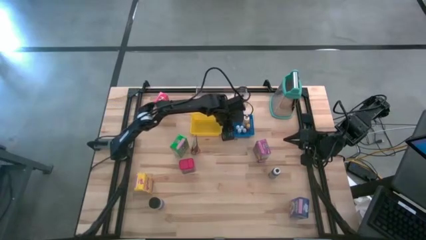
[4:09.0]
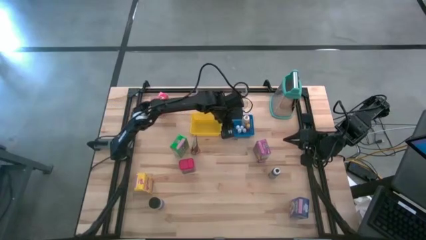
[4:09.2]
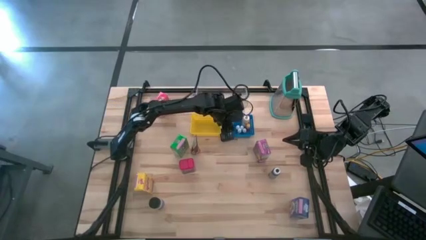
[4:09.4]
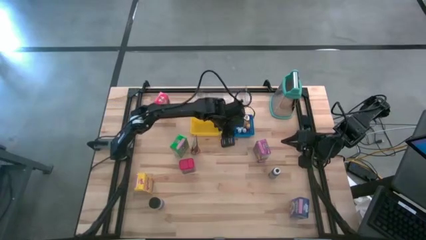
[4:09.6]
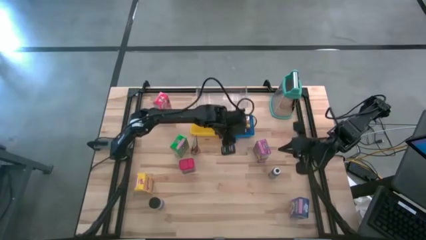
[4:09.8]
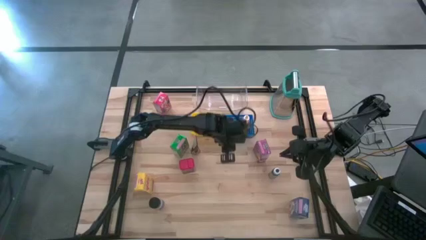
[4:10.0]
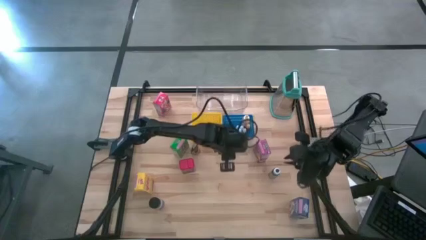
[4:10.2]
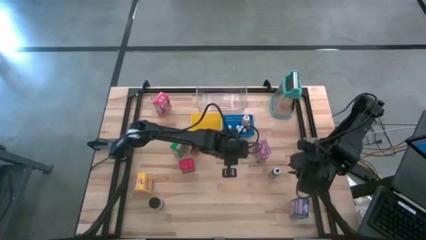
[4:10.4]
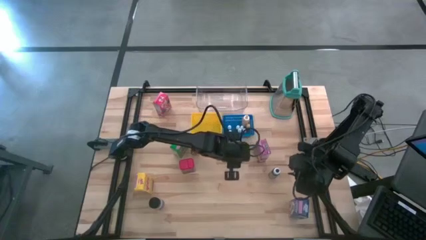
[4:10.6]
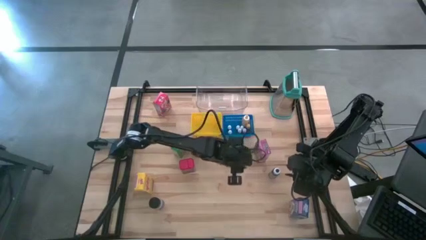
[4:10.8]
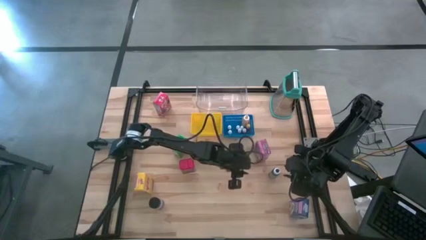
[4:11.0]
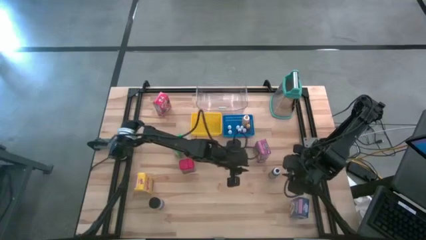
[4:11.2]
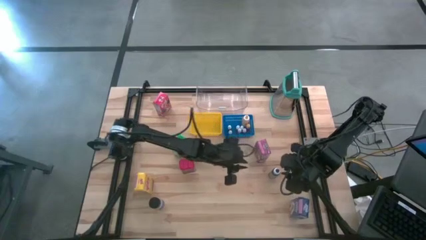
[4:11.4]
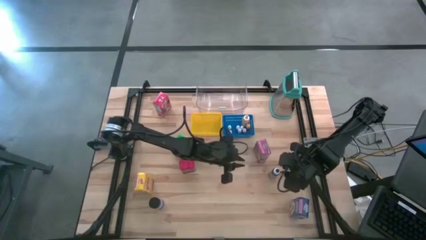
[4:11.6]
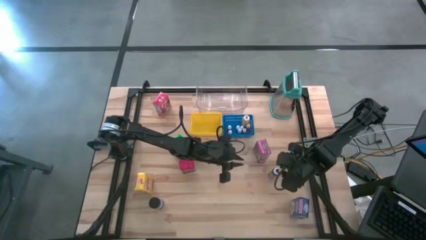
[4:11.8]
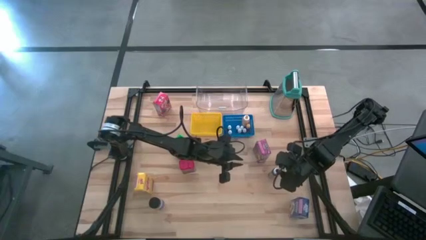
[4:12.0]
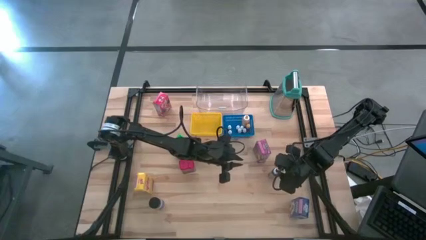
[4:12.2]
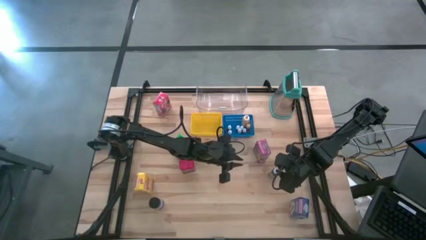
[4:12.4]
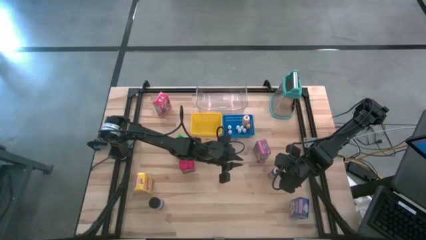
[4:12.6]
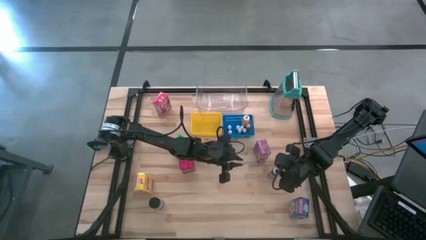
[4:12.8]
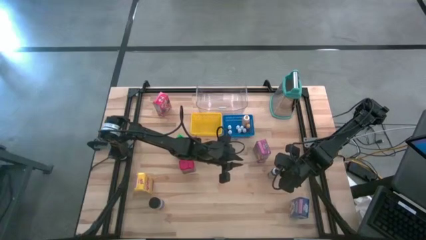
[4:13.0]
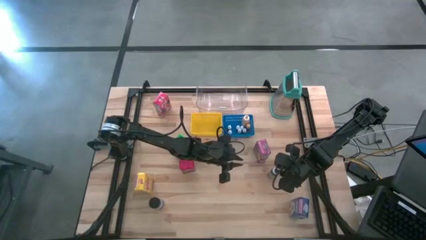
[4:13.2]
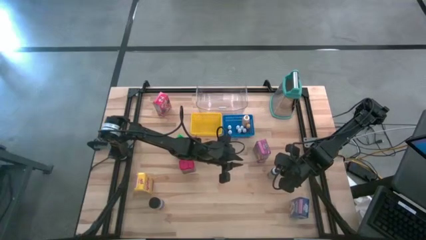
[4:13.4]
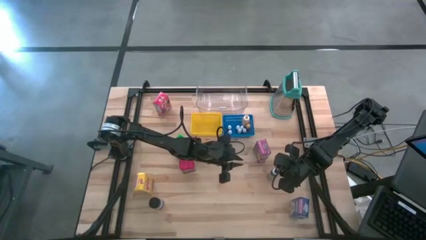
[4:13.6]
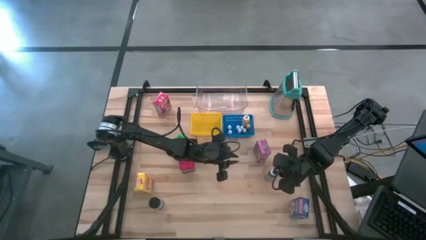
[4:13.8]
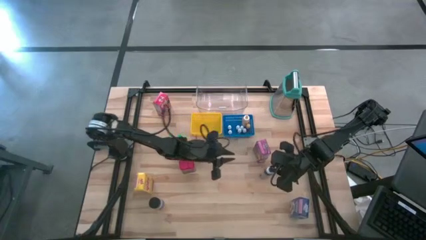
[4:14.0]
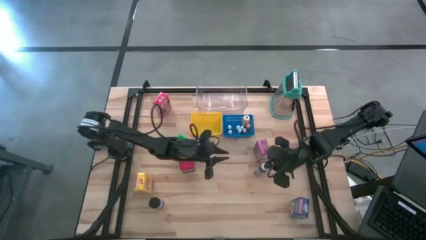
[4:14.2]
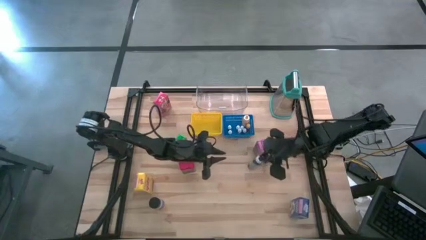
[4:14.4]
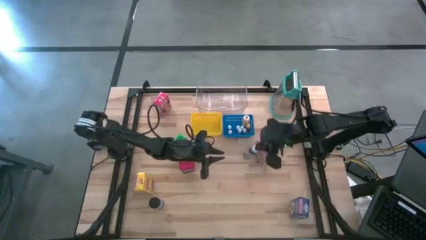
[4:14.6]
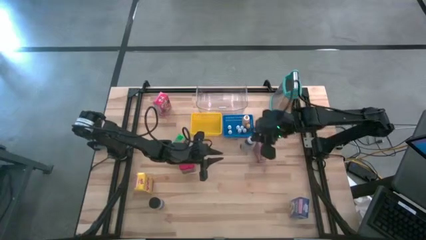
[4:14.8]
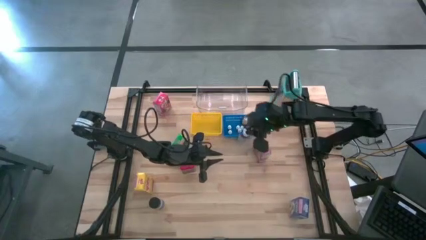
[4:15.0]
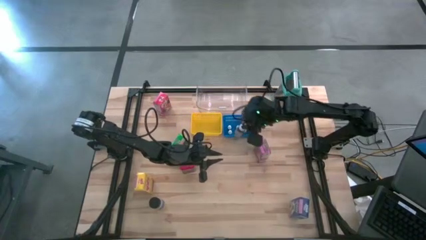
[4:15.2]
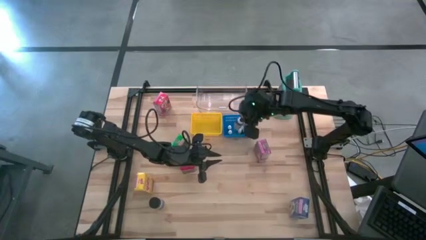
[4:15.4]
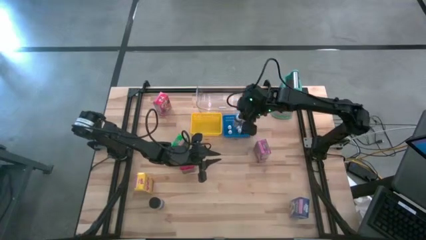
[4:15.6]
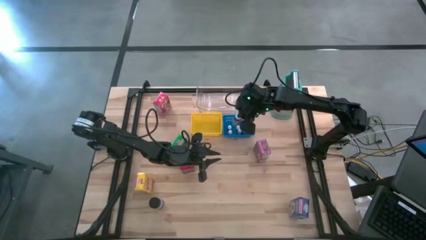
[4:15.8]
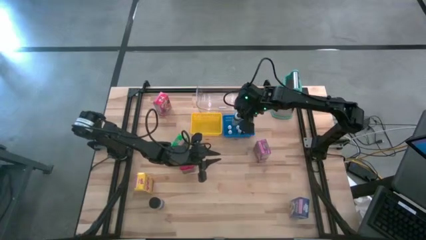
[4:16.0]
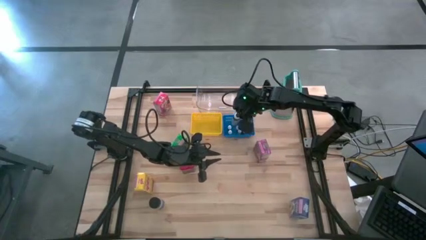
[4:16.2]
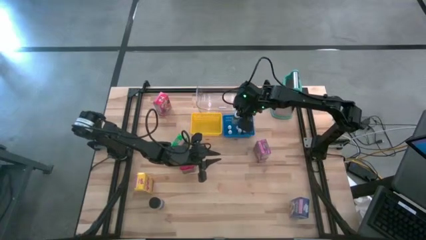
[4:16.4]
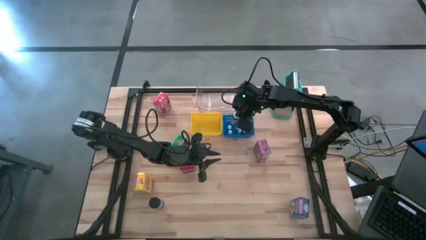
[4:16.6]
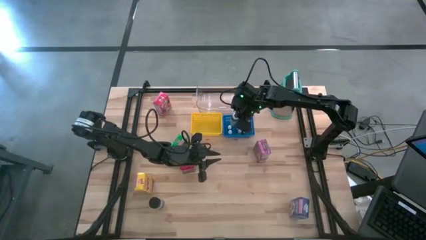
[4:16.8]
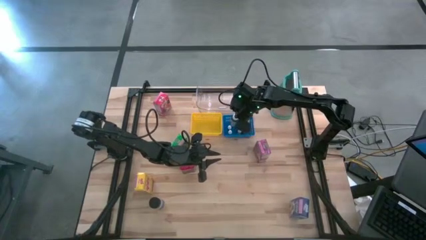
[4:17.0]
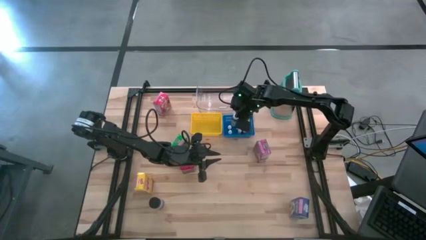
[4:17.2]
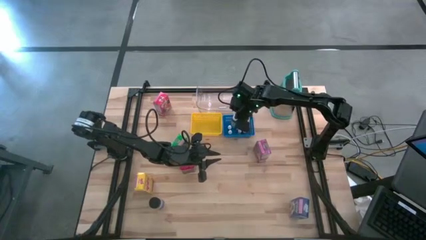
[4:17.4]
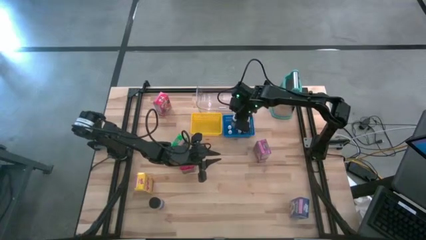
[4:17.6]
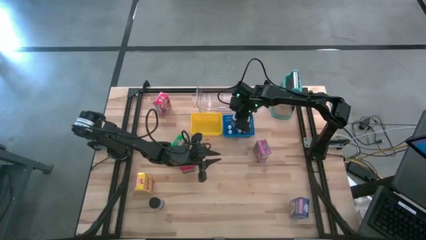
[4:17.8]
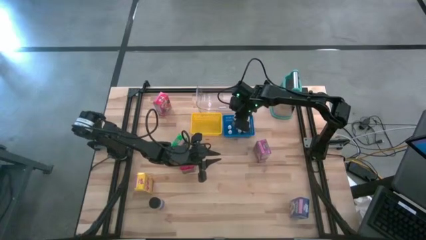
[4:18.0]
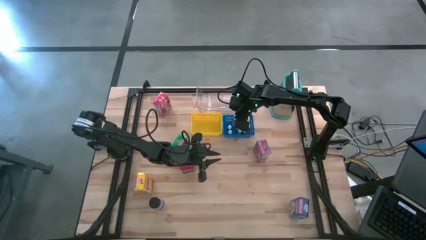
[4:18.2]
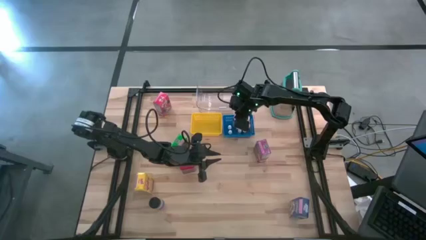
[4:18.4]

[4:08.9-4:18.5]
Task: Pick & Place Kitchen Items
Put the black food coloring bottle into the blue bin

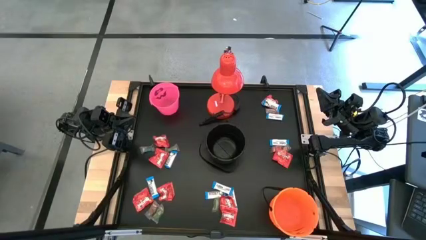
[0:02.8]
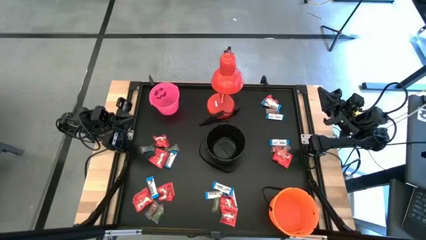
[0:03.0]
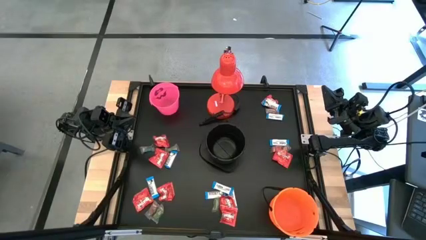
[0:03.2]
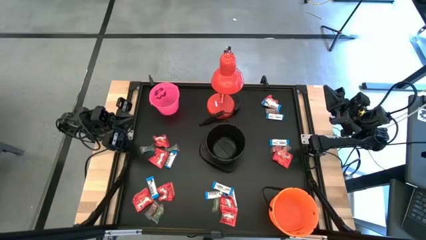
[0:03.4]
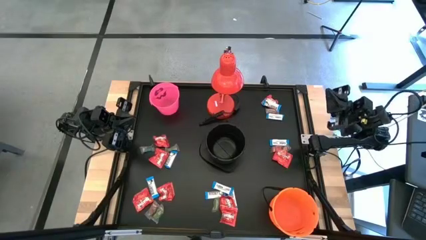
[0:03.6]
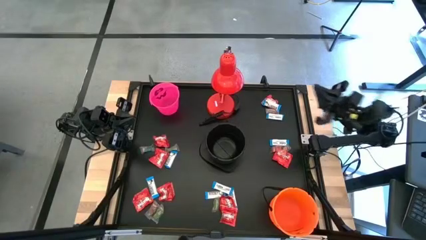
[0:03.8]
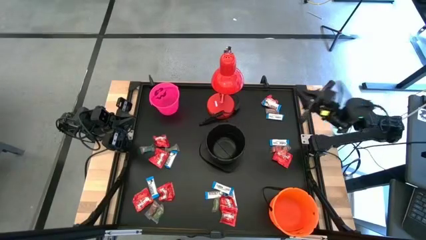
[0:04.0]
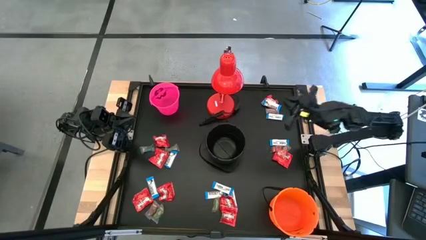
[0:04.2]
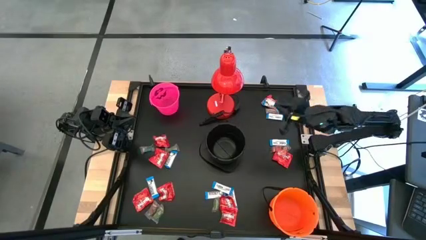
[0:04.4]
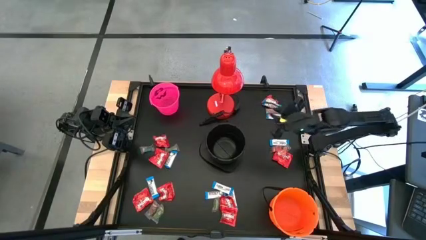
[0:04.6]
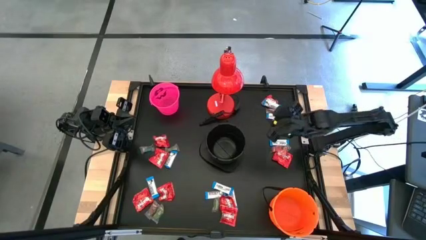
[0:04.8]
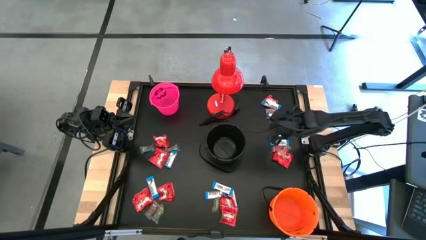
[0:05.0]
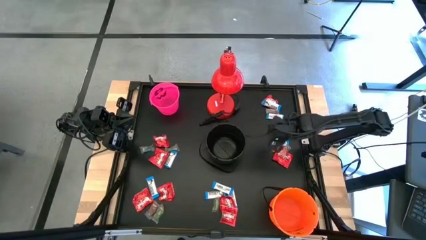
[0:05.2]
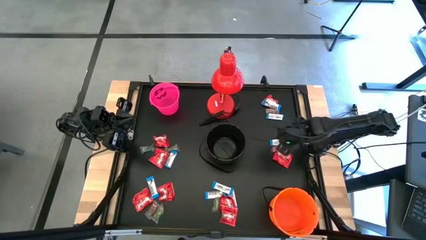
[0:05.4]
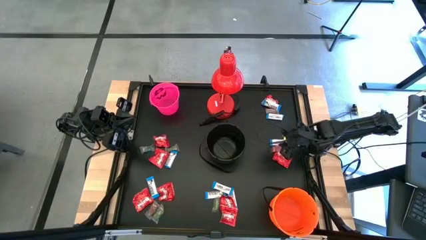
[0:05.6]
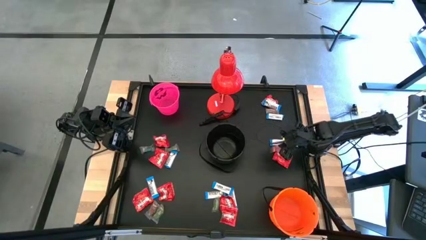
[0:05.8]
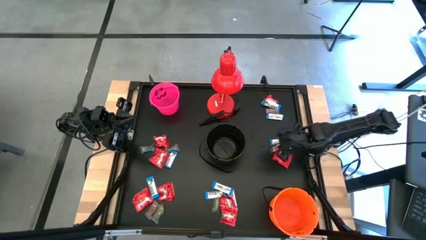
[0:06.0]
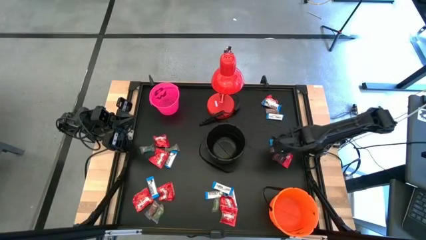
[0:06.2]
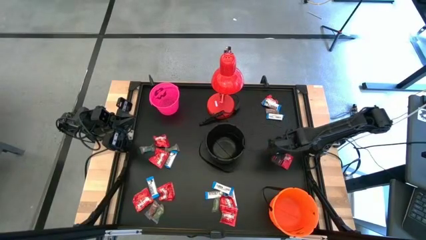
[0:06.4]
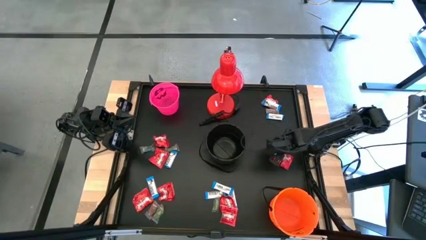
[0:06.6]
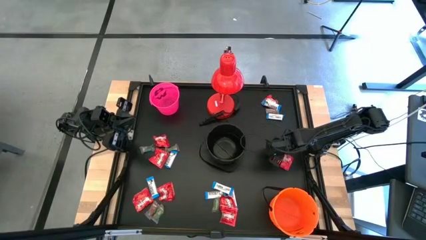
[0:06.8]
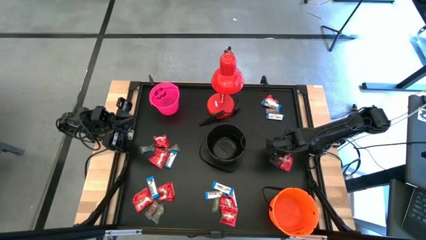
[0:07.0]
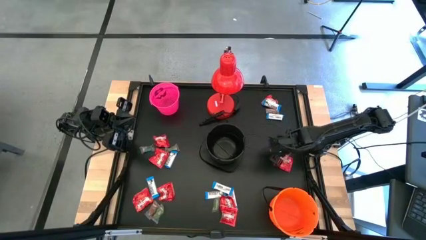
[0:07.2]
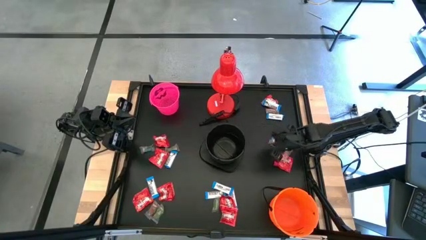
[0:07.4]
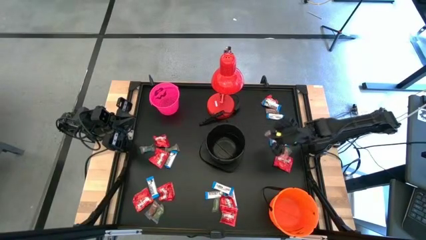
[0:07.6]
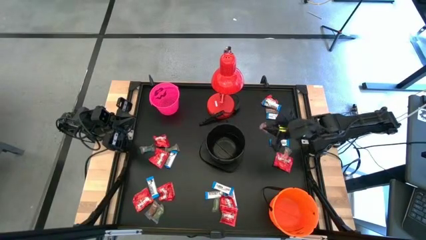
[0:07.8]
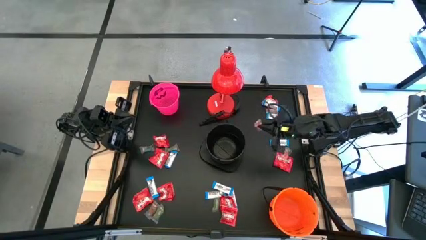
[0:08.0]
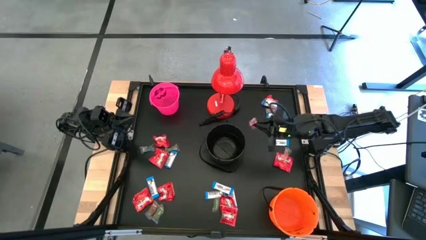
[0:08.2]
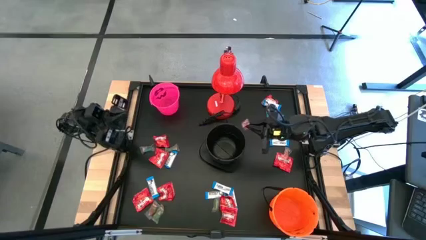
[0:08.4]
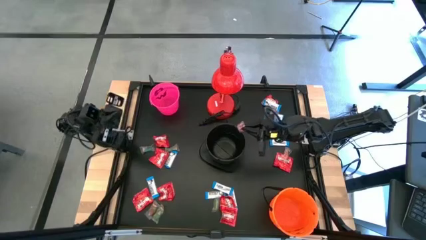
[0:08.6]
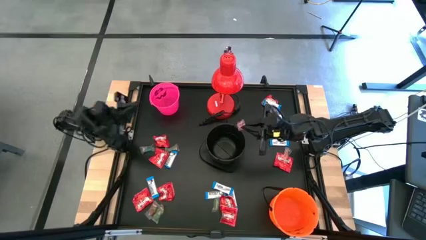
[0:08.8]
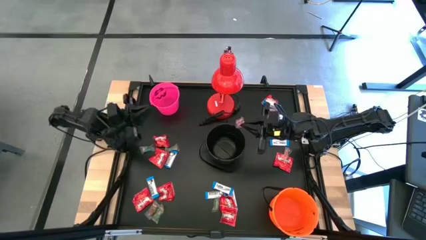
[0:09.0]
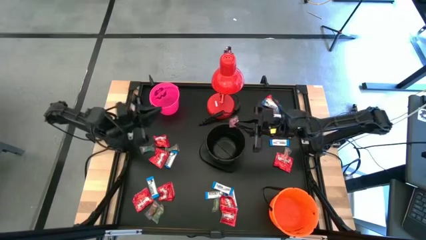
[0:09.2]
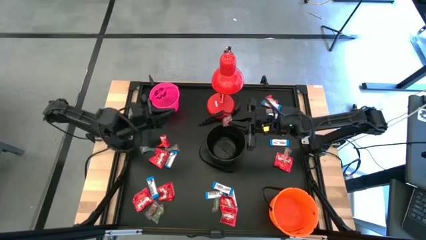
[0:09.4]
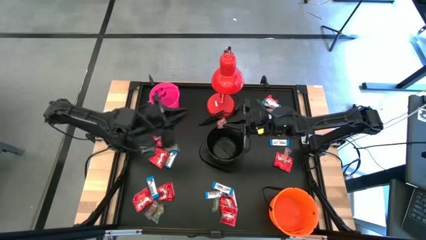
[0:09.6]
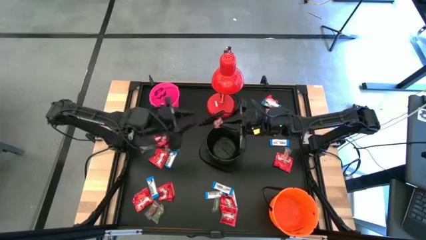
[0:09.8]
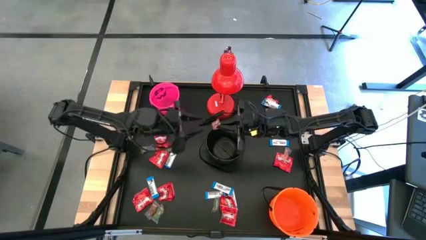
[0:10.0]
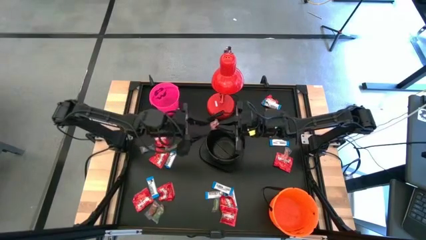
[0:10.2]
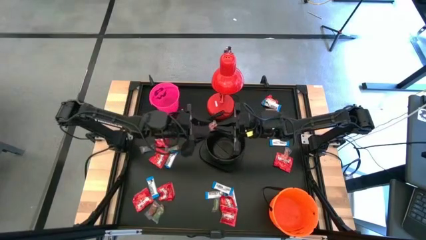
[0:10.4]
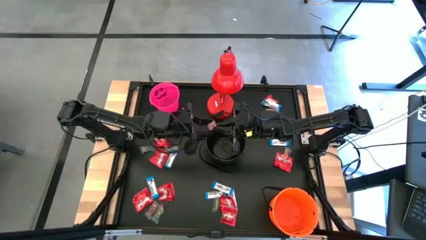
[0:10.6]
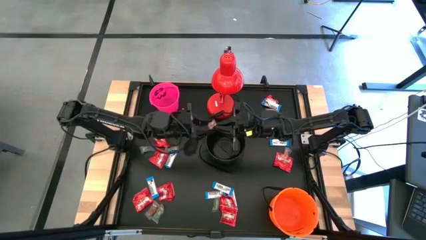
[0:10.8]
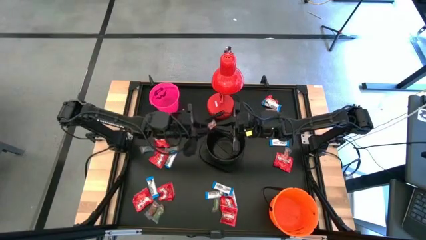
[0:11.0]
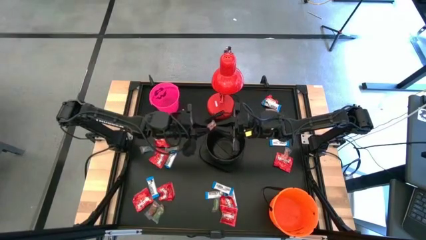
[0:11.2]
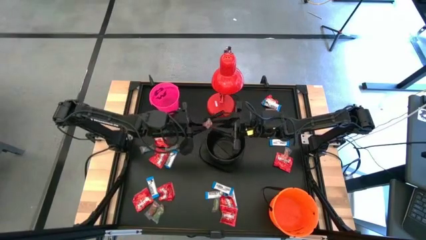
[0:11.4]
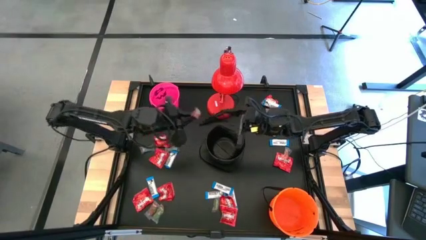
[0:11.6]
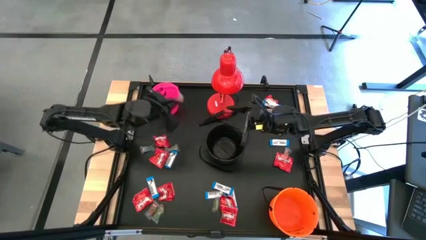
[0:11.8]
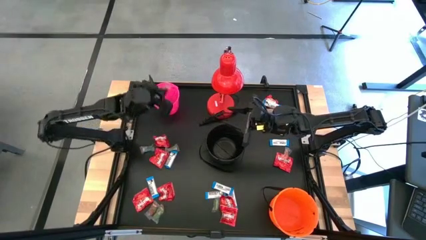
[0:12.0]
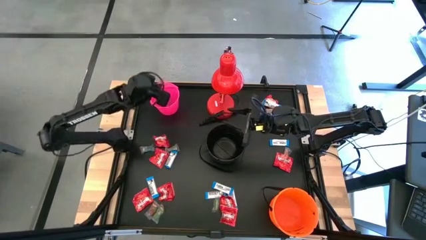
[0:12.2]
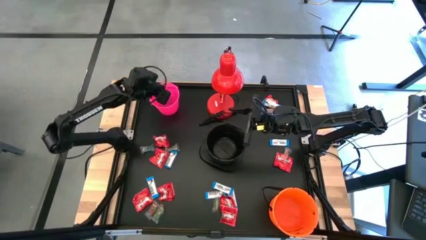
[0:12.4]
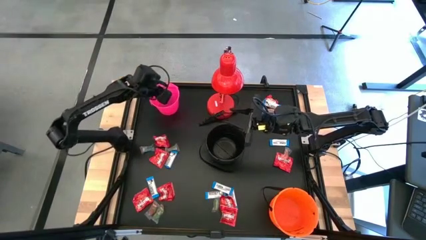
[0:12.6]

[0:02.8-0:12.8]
Task: Organize candy in baskets
Put the red gummy into the pink bucket
